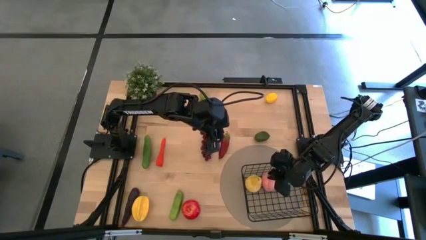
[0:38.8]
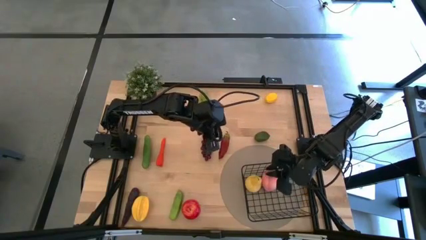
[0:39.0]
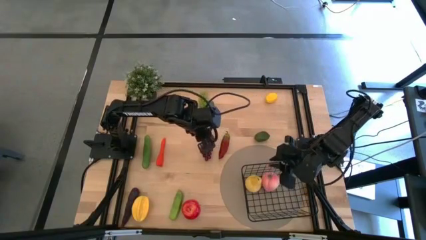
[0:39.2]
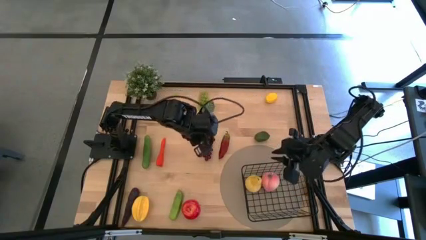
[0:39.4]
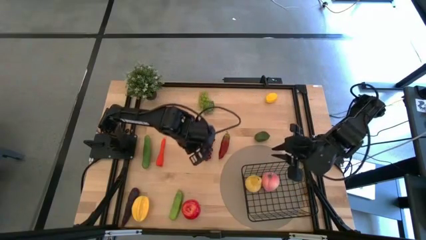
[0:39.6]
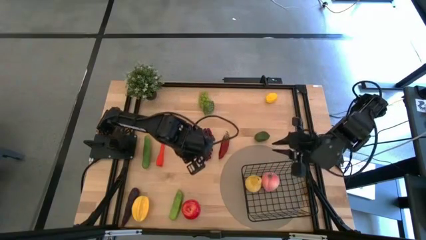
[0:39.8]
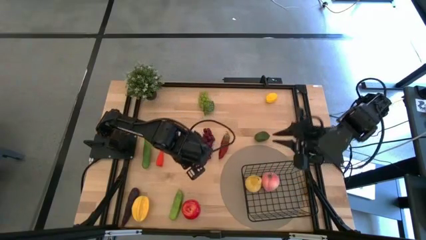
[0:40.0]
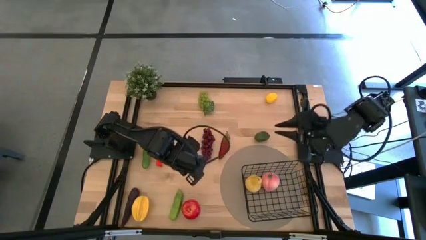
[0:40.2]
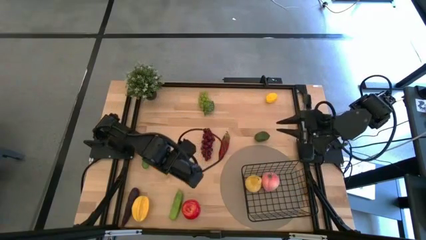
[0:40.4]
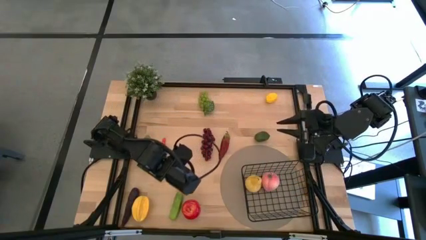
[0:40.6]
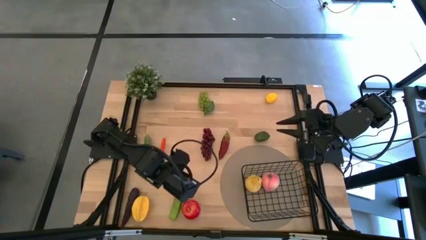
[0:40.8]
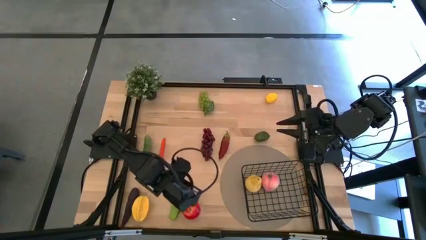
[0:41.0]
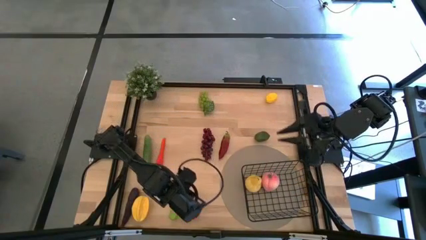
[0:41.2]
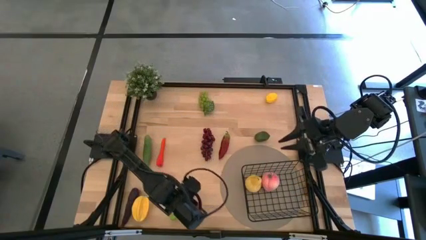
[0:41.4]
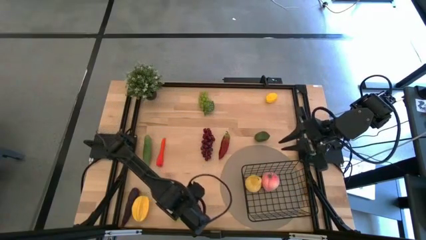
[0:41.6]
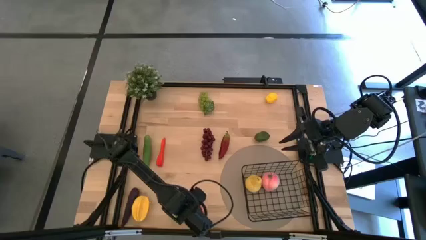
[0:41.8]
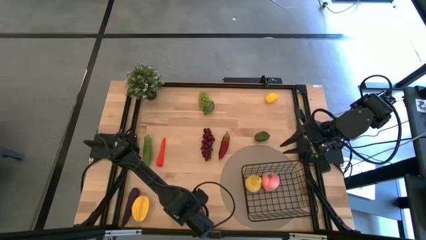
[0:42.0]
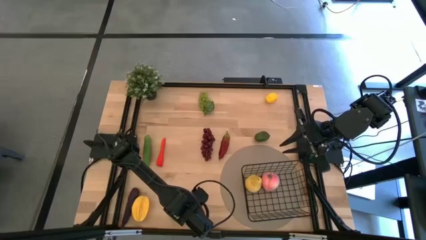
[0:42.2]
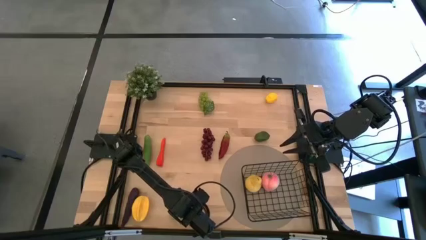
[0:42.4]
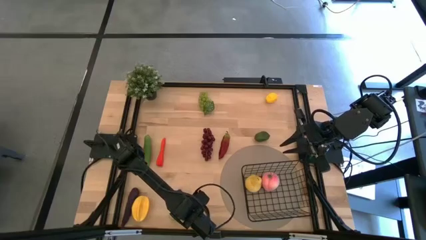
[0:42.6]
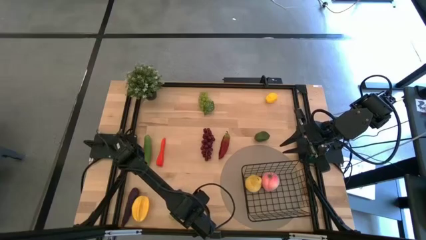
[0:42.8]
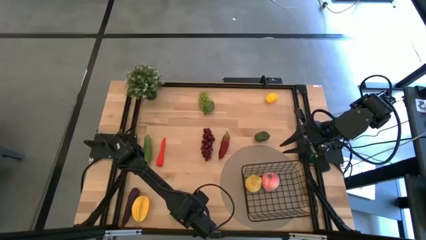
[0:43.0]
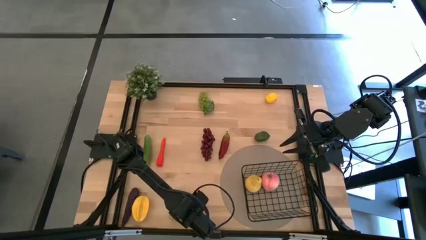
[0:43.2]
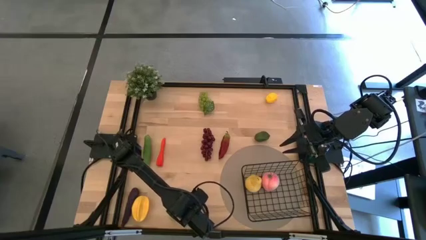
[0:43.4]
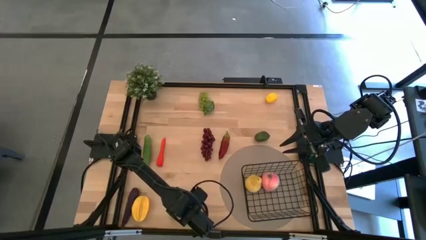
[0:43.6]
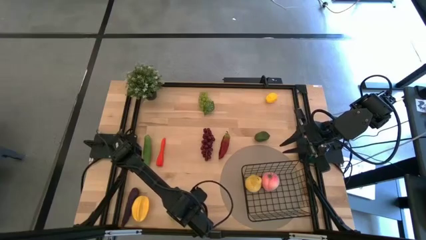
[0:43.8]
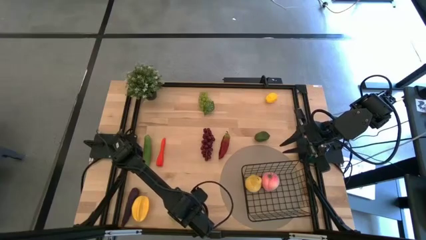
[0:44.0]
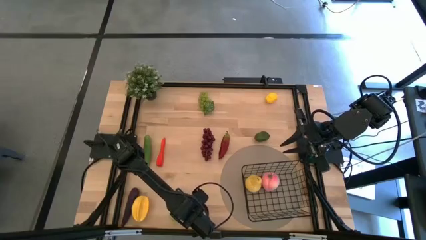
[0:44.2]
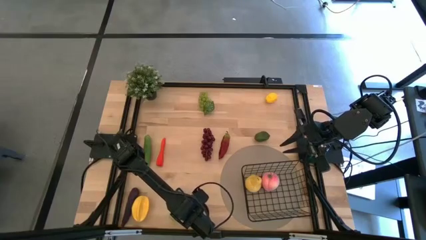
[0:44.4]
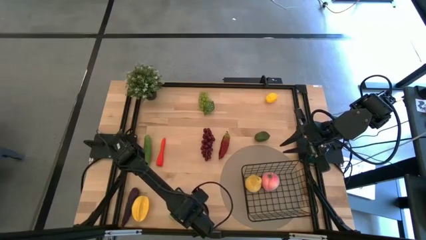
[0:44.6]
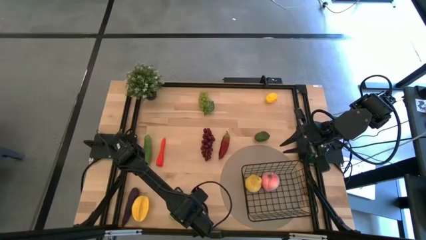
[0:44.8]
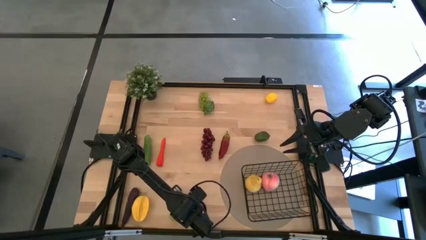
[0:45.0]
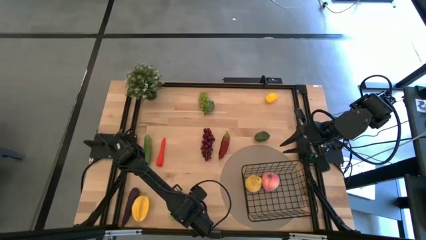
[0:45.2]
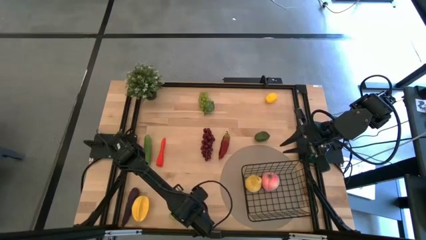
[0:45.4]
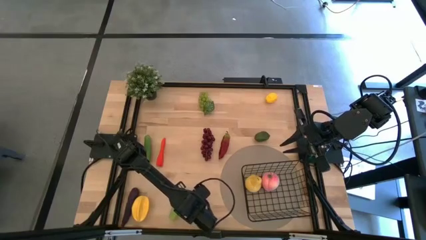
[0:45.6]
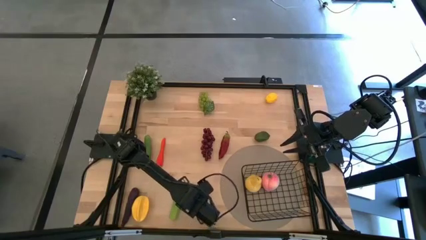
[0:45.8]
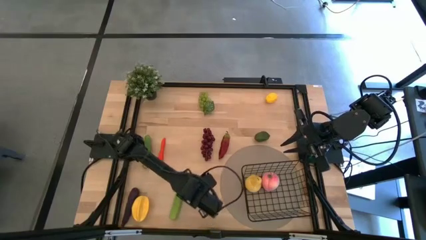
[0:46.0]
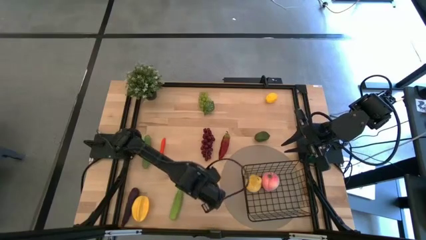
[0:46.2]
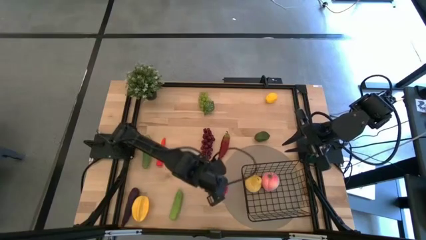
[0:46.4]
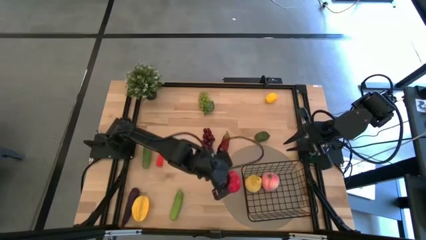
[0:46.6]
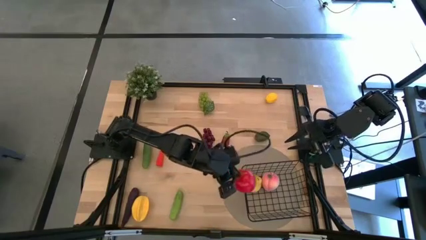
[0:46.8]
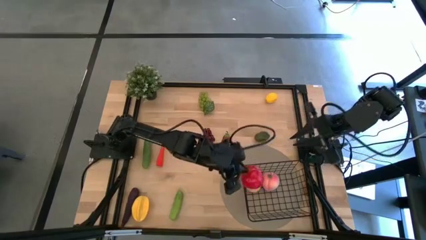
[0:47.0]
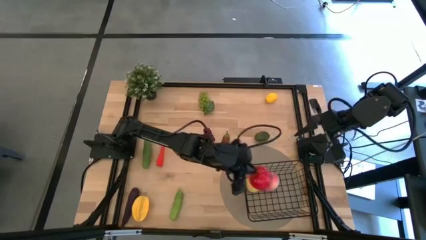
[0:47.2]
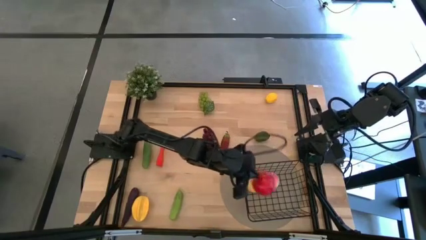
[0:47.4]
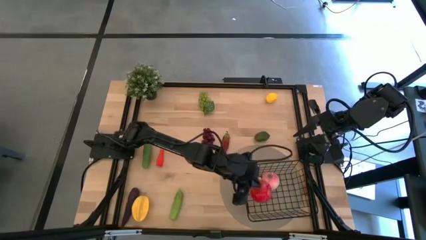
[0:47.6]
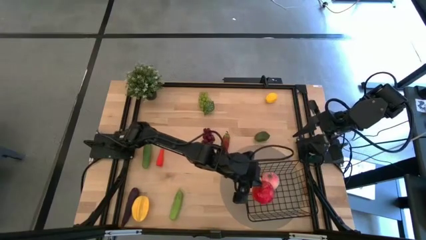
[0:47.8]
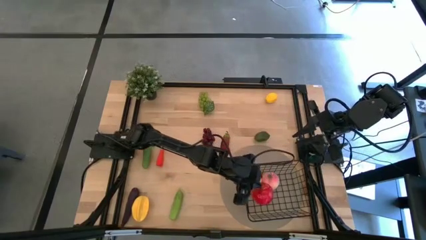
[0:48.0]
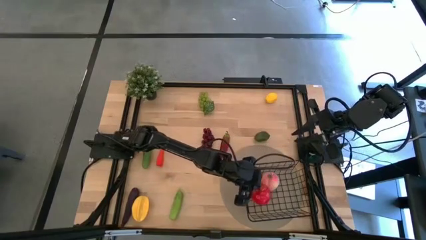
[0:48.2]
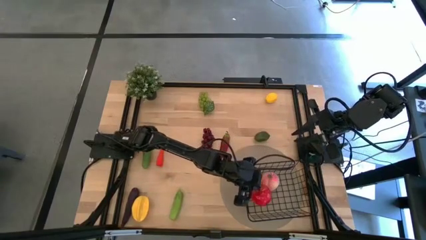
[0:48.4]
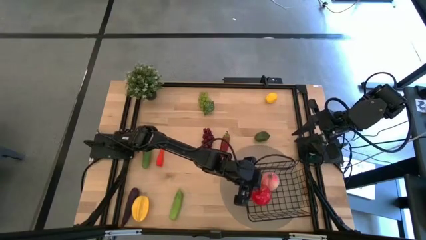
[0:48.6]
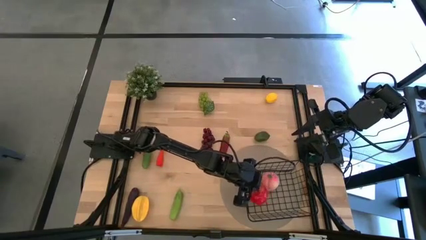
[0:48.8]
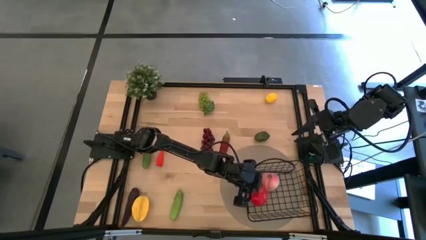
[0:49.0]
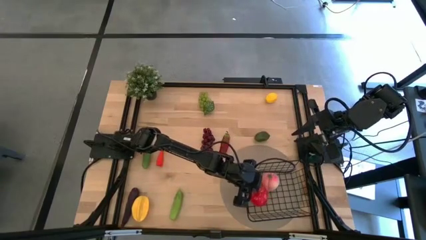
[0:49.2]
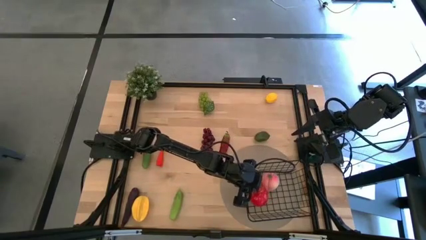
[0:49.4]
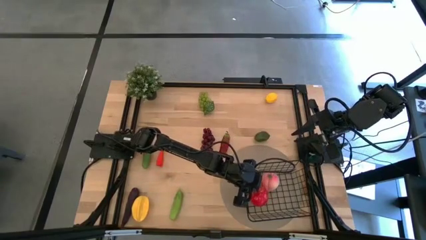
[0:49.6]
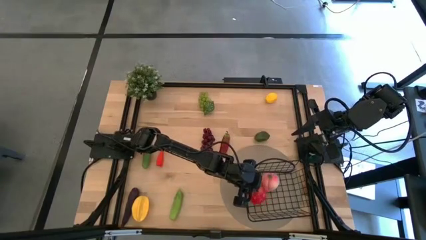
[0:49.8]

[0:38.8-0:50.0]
Task: Build produce basket
Put the apple into the wire basket

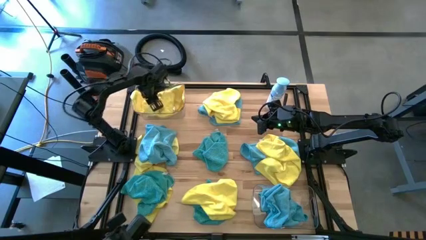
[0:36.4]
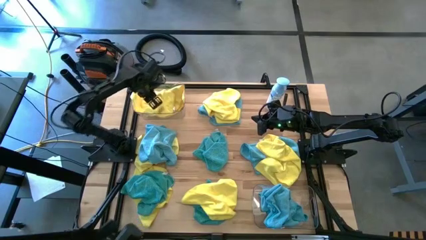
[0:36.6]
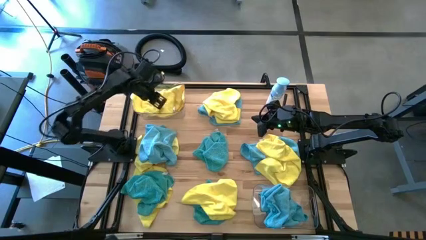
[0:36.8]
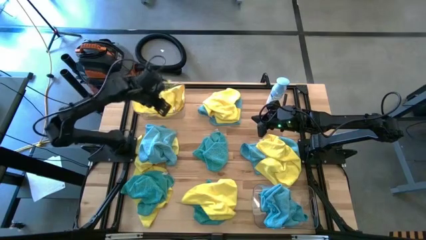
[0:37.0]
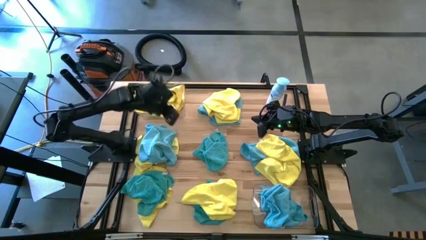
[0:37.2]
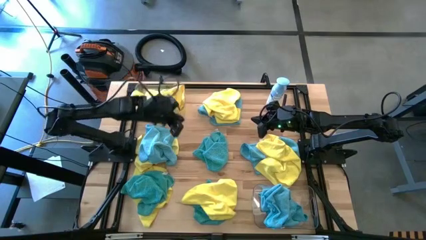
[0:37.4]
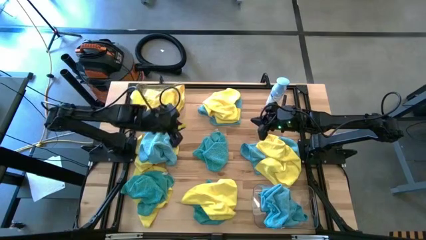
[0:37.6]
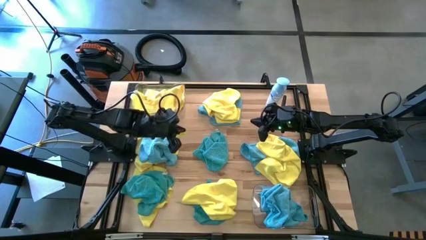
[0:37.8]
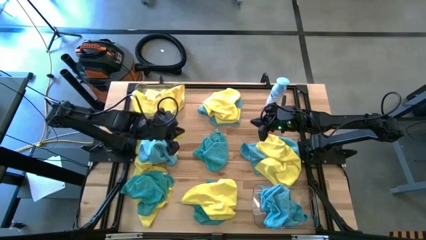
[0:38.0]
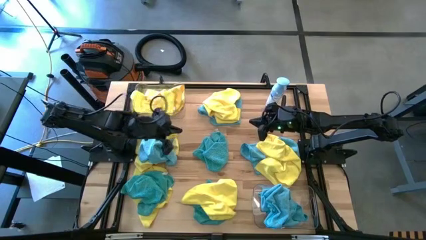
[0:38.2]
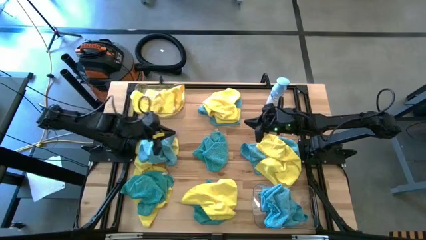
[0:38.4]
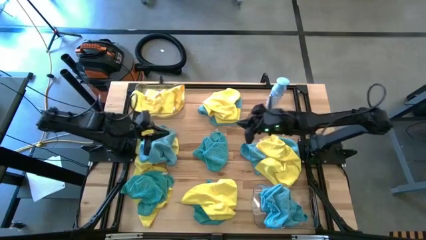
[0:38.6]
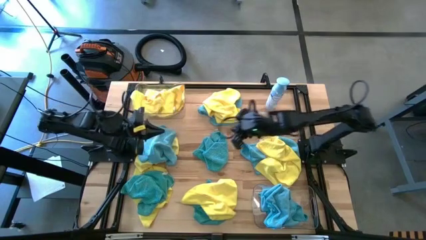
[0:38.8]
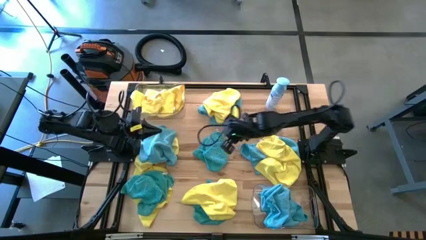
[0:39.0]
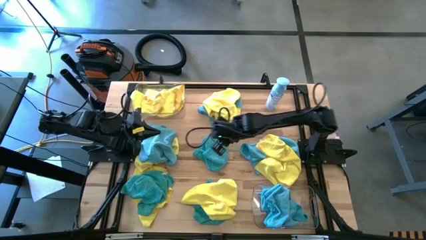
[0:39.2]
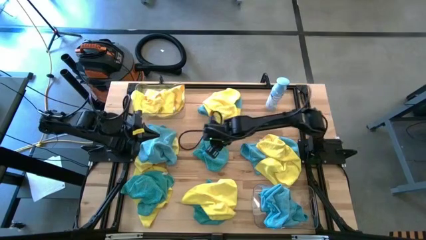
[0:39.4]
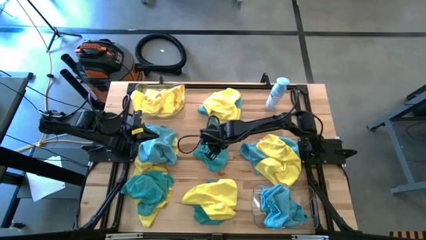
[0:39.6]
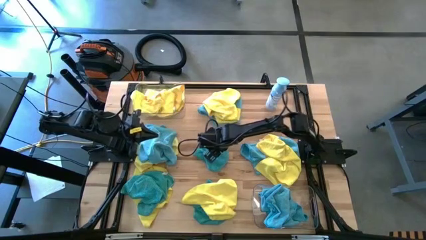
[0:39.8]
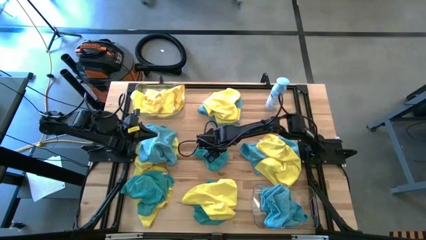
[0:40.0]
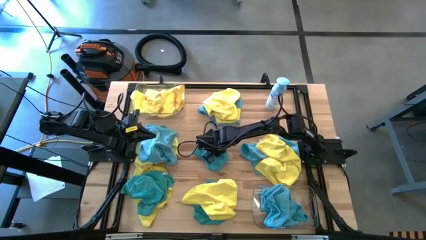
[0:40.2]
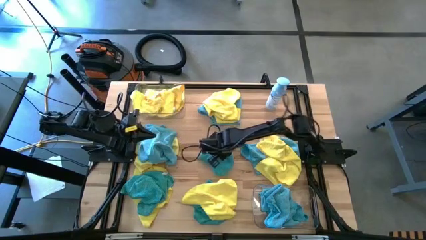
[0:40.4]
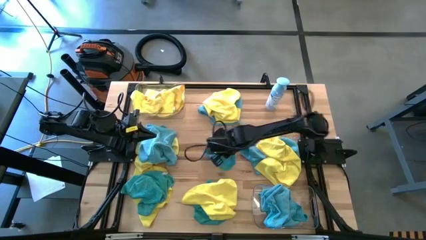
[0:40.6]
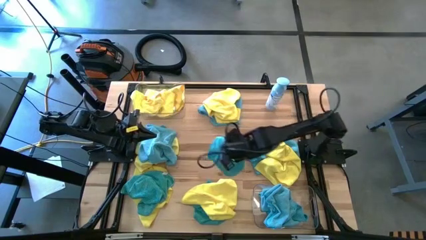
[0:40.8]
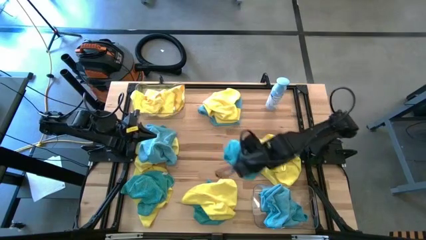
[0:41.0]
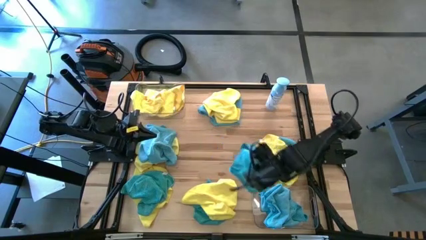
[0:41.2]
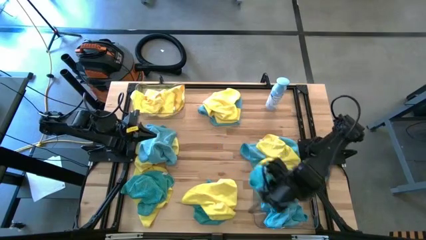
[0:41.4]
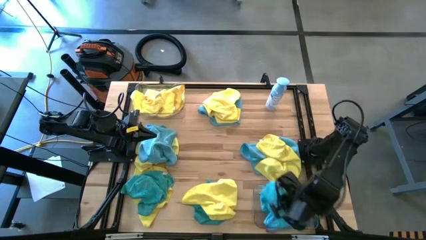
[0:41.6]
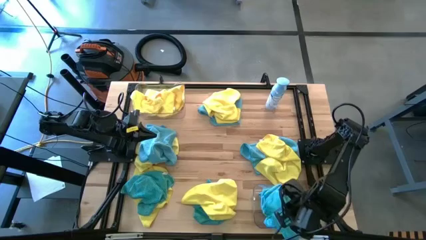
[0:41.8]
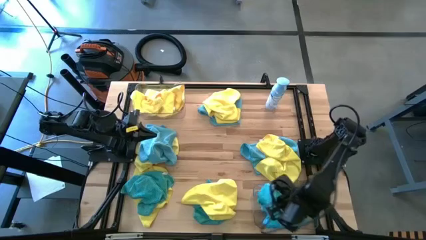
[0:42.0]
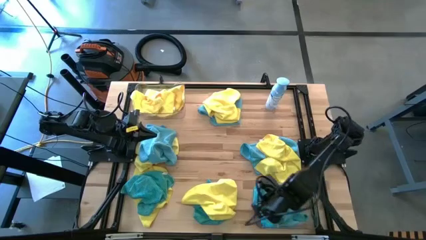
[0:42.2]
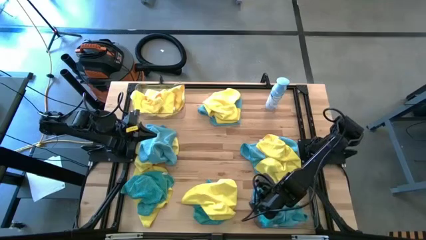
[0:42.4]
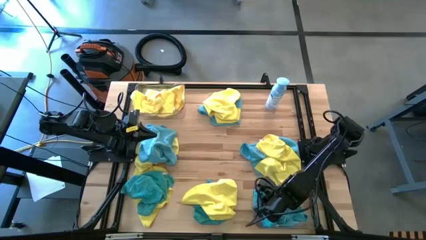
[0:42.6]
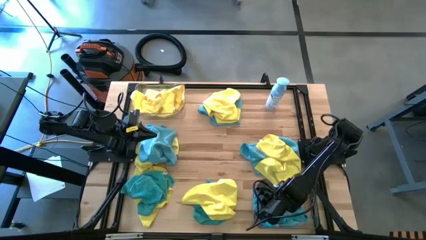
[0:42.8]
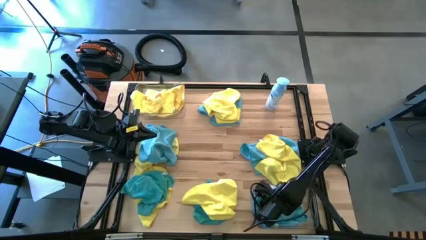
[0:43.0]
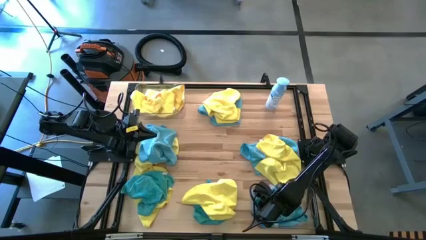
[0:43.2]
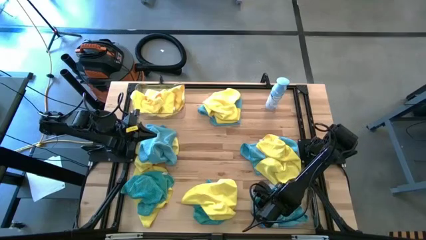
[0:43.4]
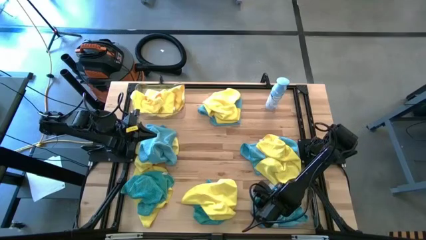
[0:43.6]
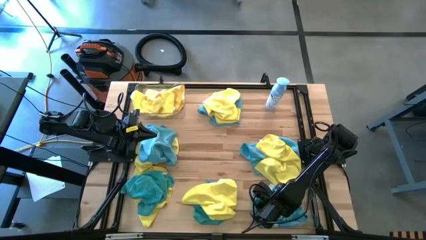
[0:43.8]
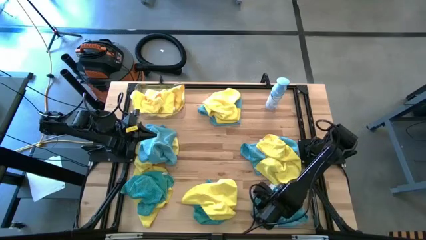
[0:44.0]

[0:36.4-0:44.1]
Task: Sort microfiber towel by color & place in baskets
Put the blue towel into the bottom transparent bin
